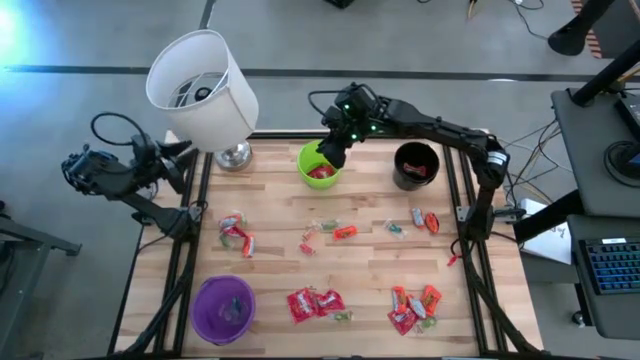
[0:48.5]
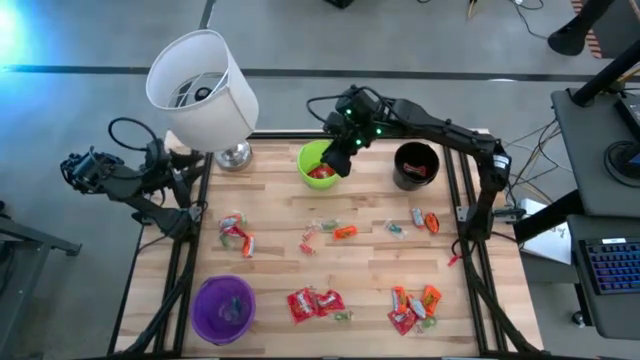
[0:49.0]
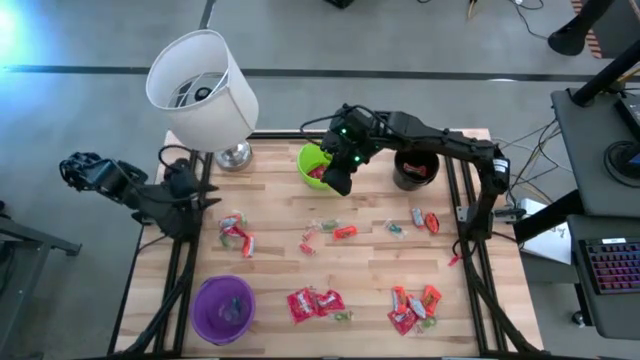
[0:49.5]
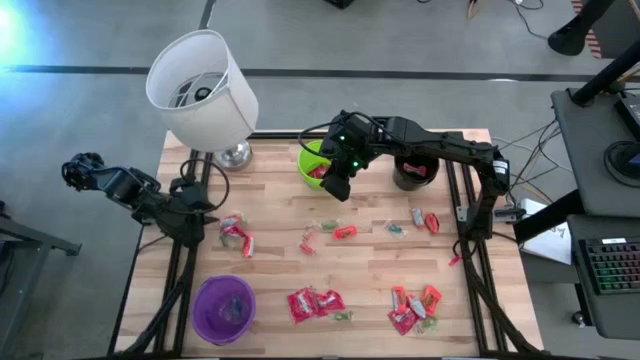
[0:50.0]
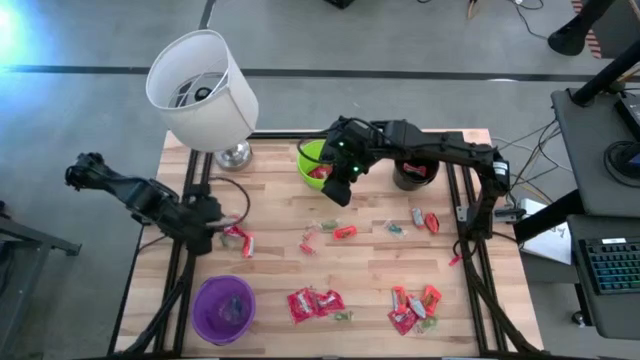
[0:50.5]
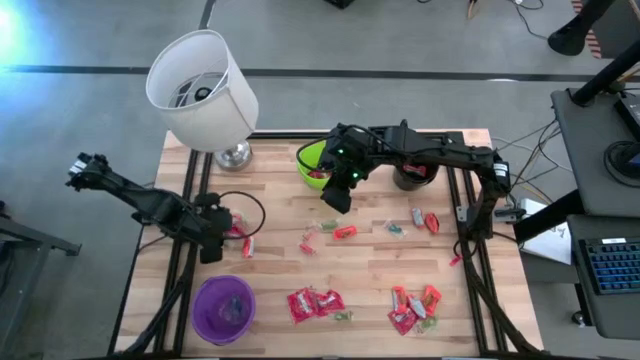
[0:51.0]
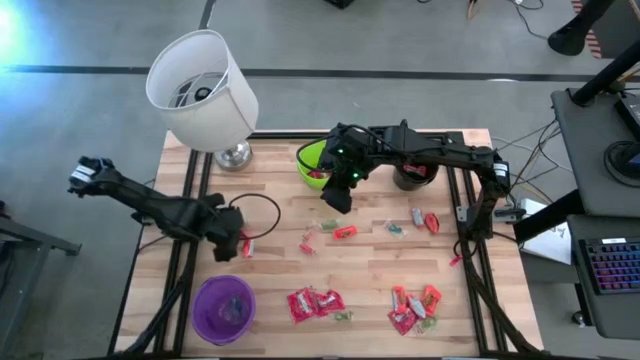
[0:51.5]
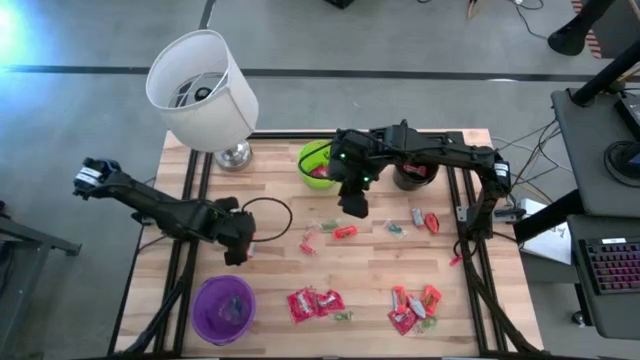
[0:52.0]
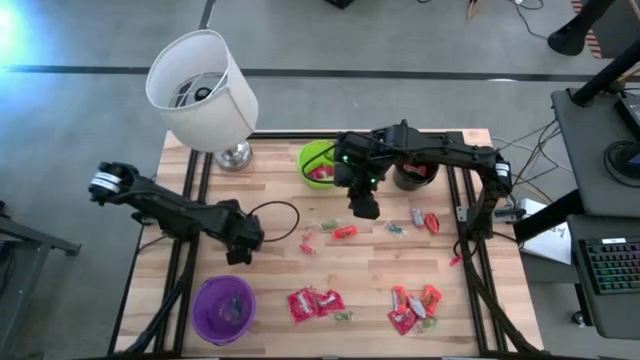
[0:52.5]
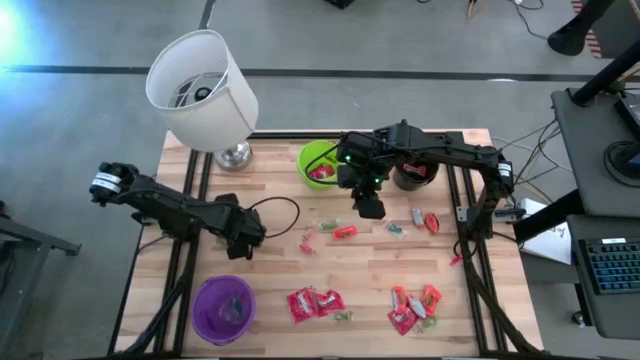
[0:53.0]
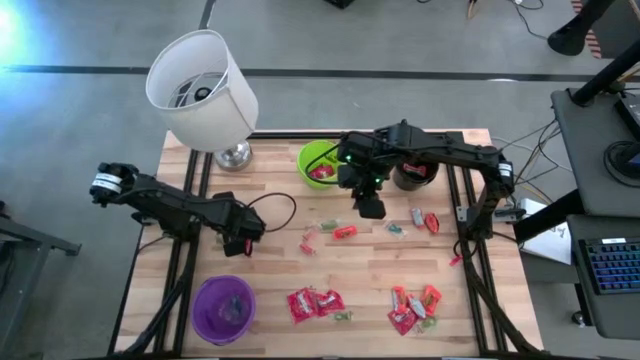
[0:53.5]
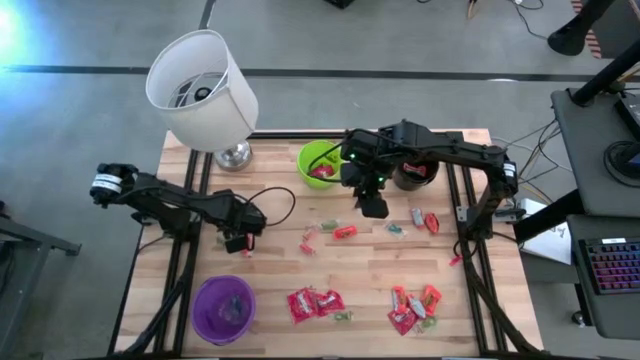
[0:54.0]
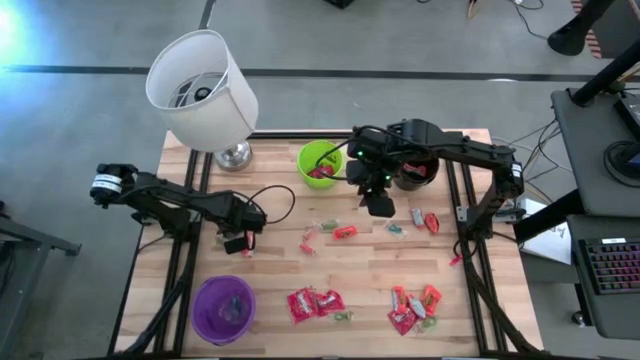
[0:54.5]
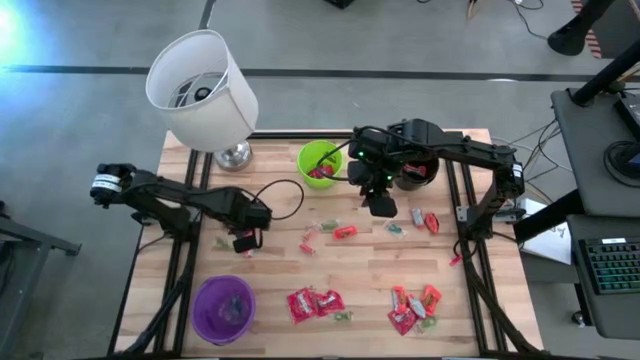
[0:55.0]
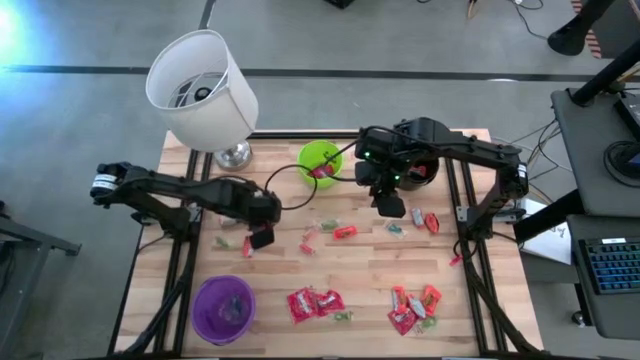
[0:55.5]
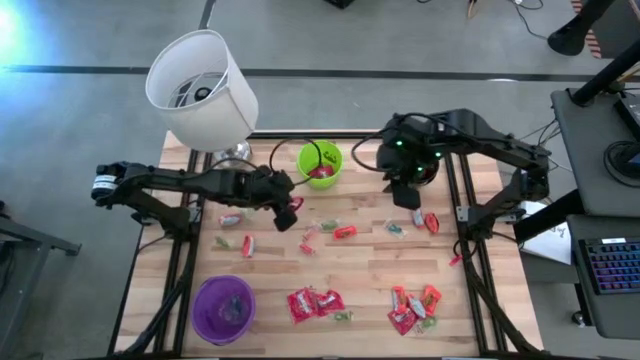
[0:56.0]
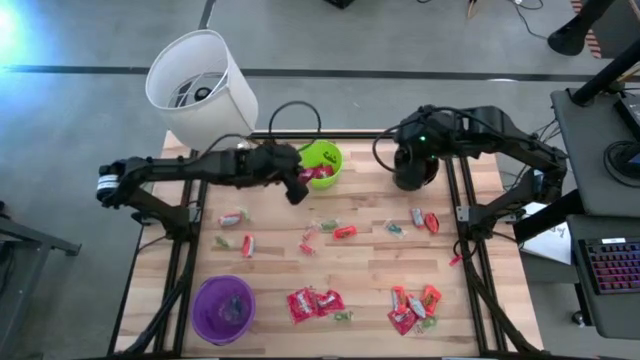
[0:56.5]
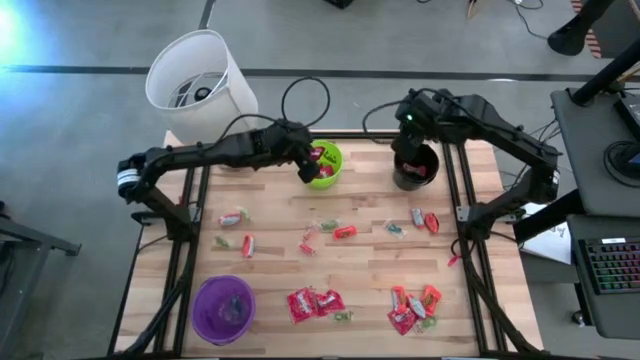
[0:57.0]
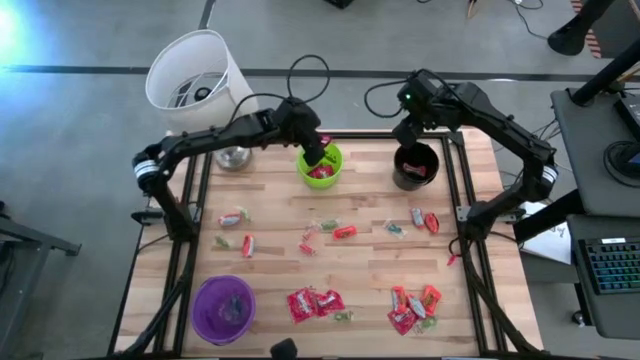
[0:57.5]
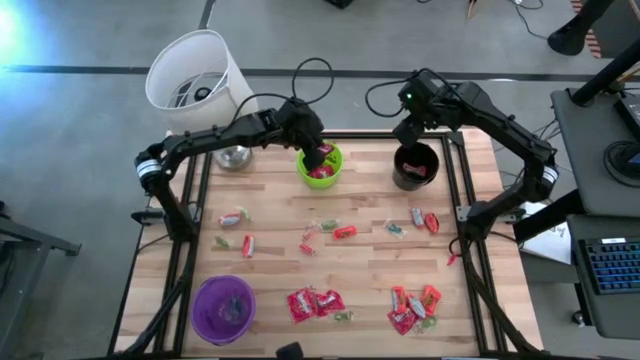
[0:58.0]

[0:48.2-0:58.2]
Task: Sort candy
Put the red candy into the green bucket

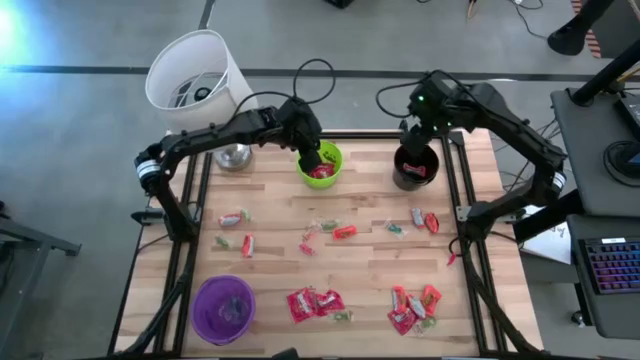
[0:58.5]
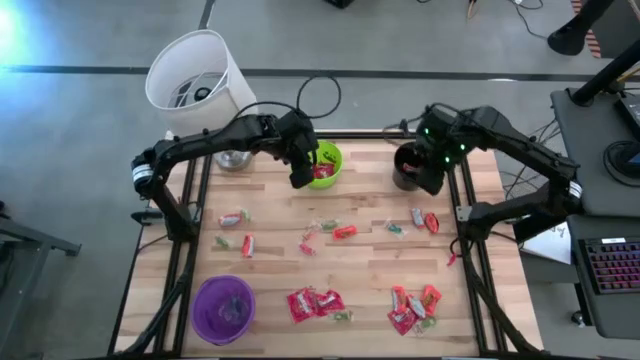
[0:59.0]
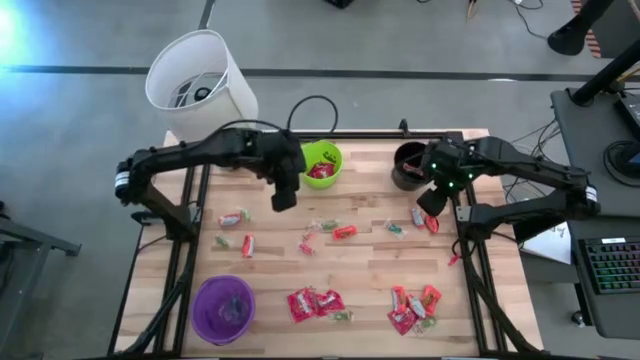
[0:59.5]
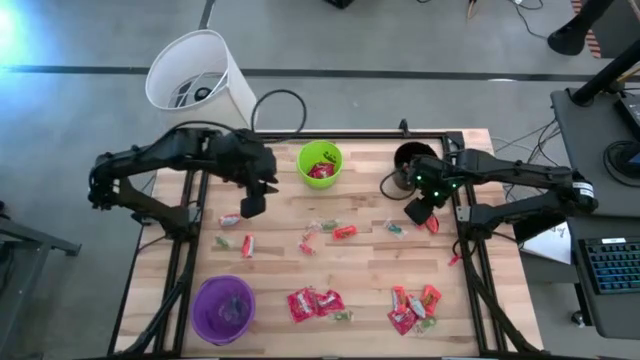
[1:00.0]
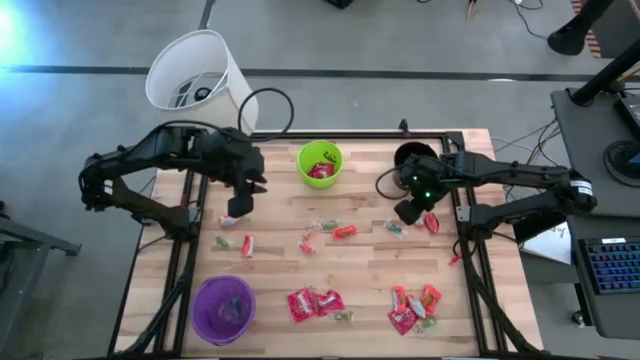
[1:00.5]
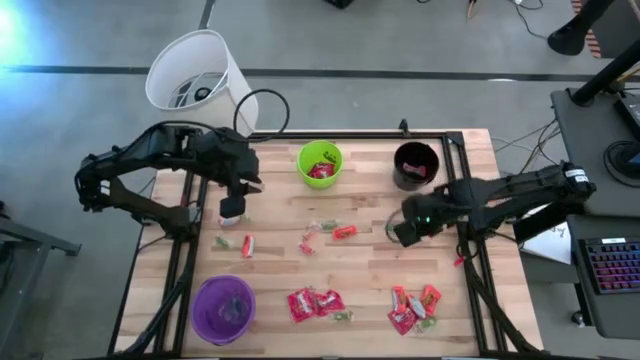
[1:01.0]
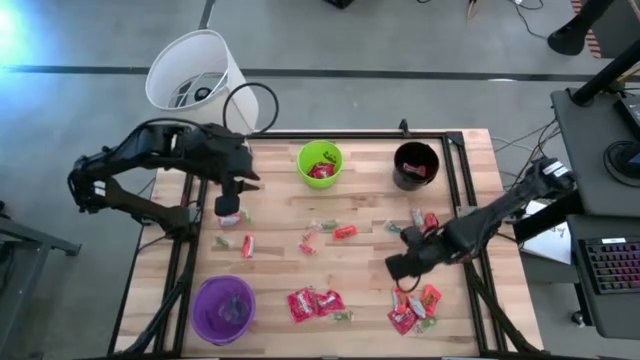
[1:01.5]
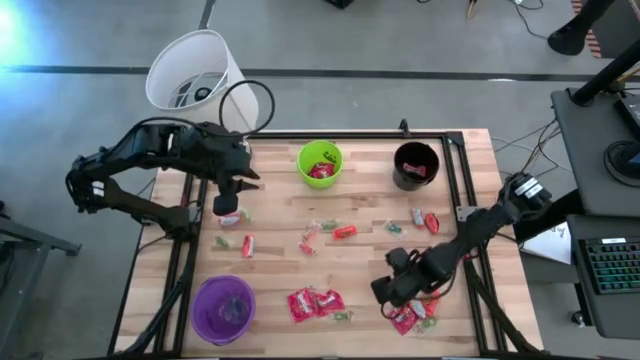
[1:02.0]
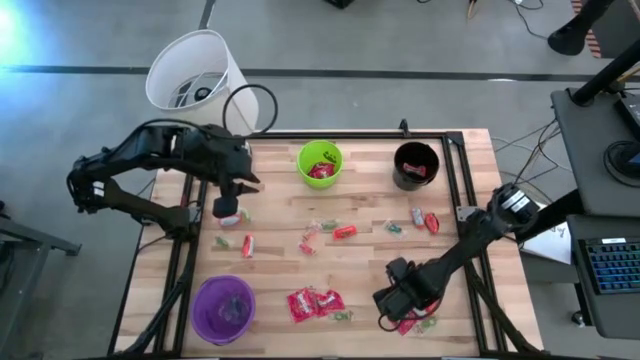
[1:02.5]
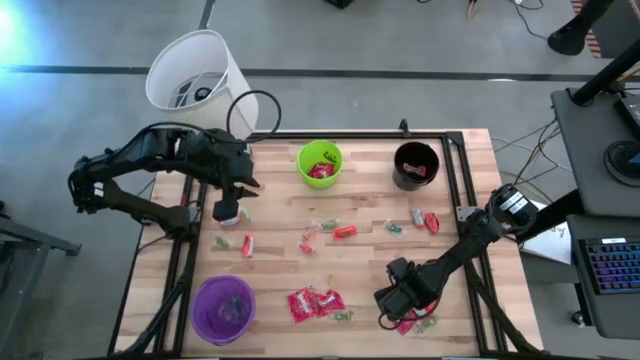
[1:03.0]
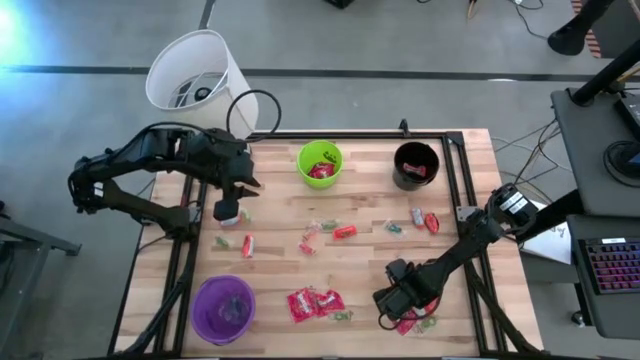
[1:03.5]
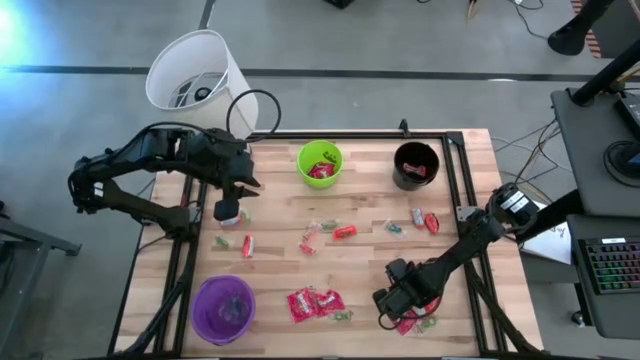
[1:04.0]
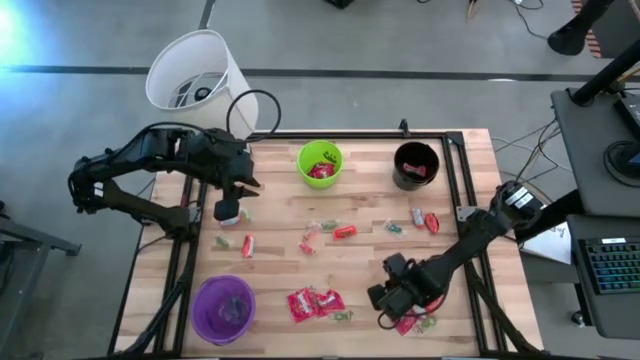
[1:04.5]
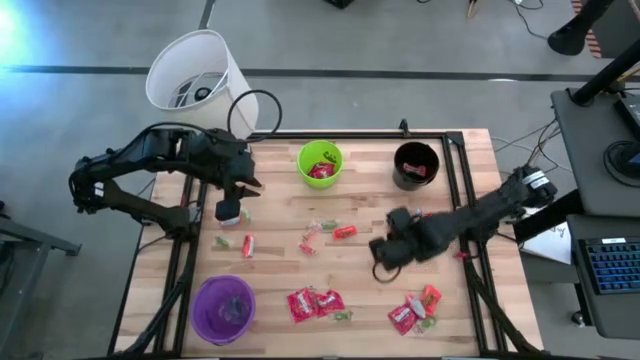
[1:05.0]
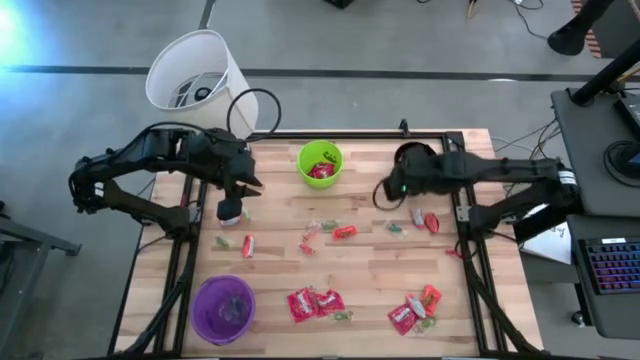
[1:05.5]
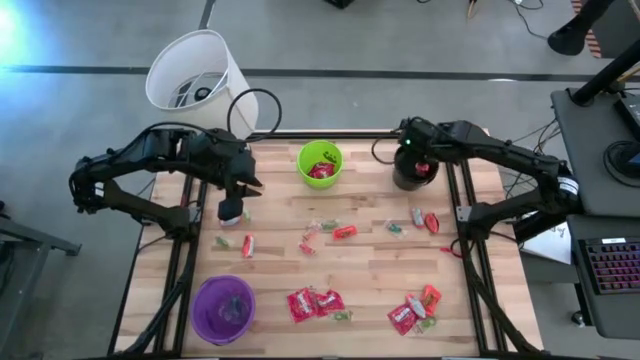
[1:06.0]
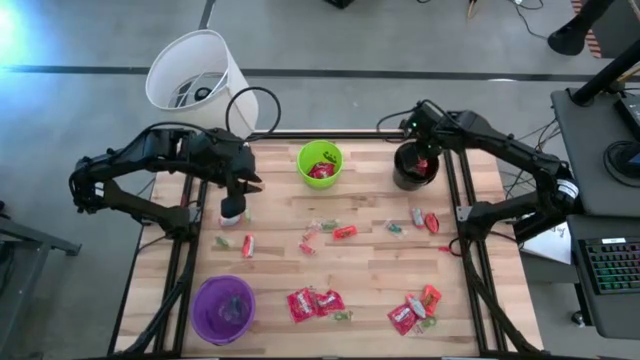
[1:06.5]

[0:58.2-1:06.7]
Put the orange candy into the black bucket

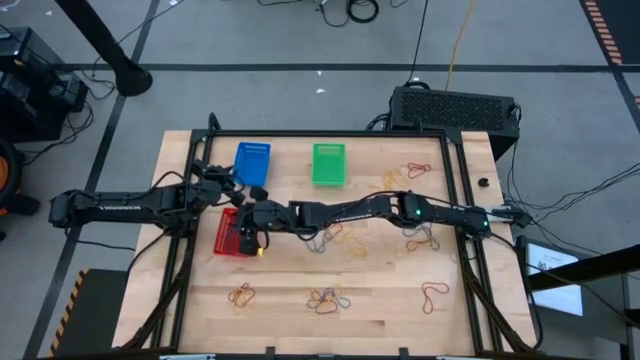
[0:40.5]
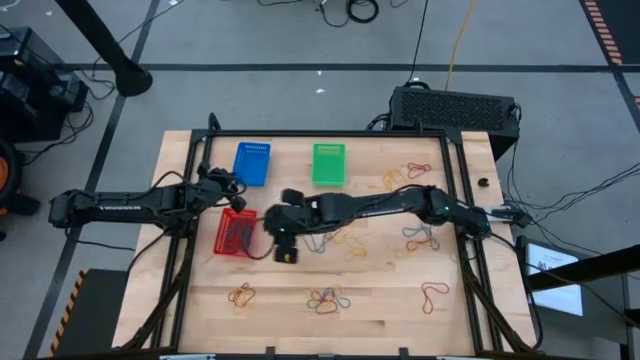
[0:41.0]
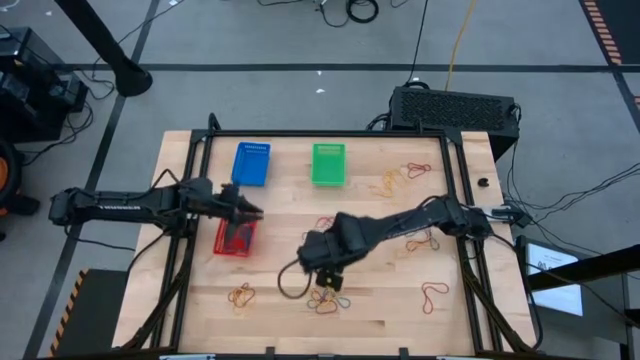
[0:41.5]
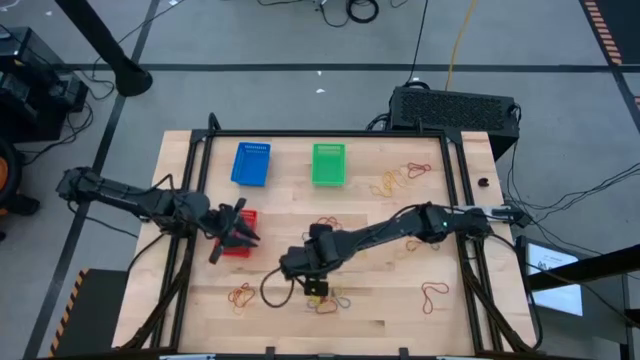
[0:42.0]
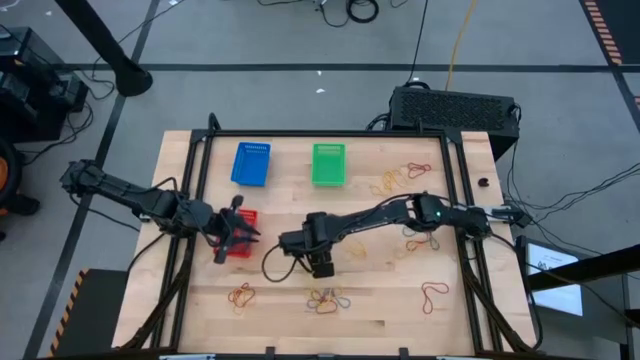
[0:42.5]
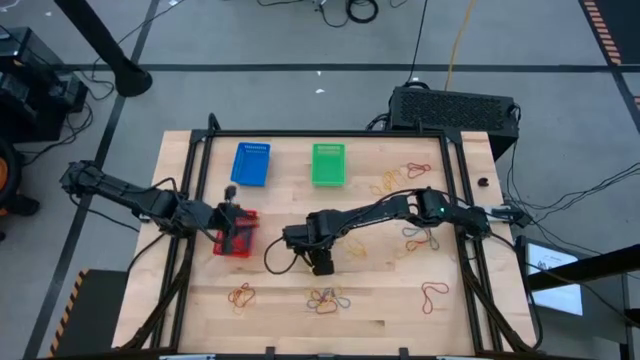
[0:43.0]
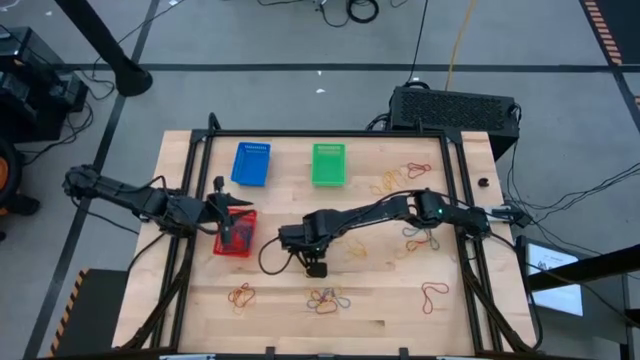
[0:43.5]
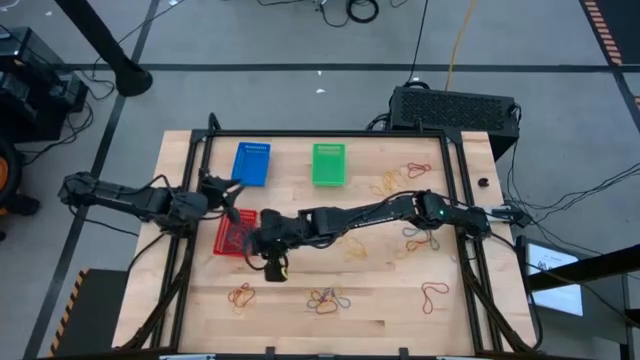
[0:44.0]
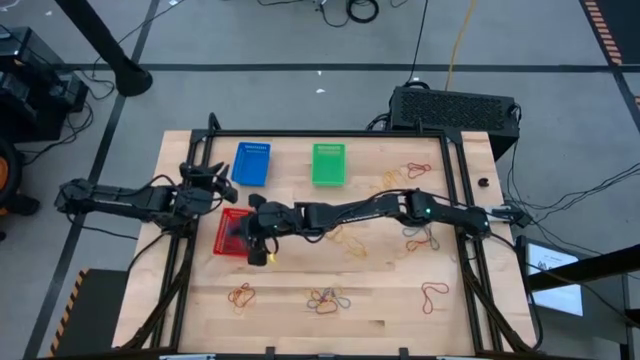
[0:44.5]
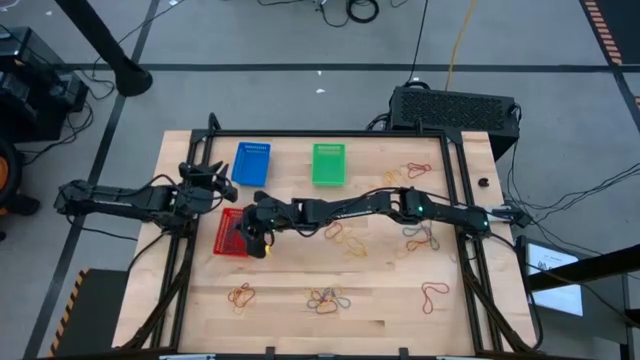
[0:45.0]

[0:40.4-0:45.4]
Task: Sort rubber bands into baskets
Put the blue rubber band into the red basket
